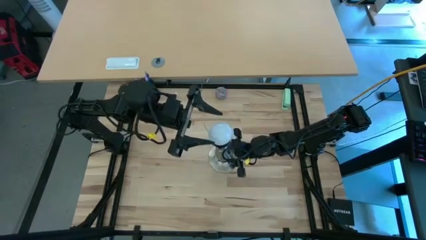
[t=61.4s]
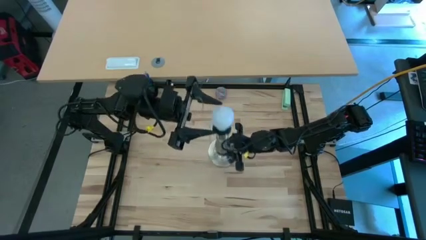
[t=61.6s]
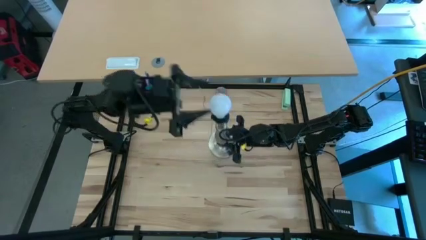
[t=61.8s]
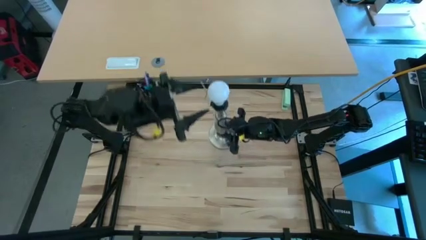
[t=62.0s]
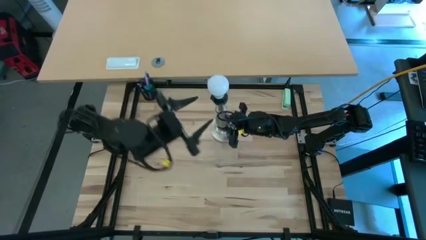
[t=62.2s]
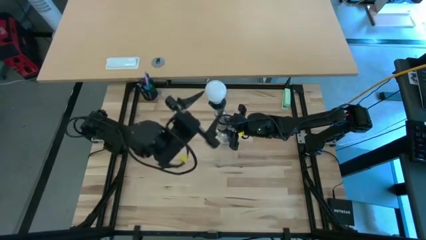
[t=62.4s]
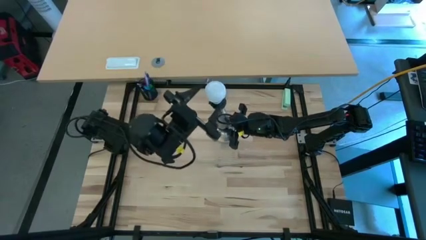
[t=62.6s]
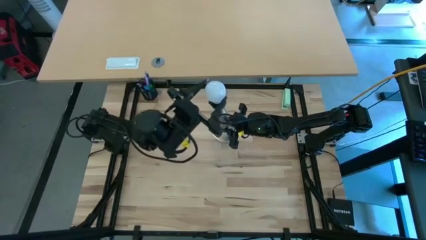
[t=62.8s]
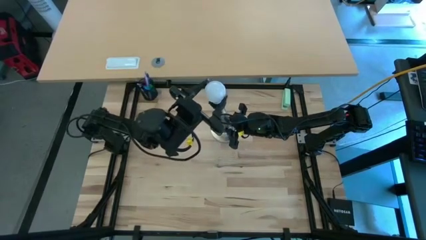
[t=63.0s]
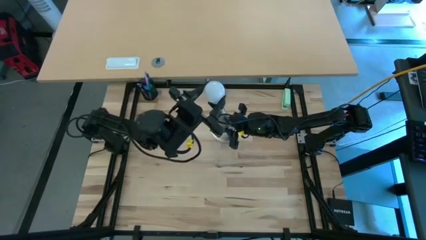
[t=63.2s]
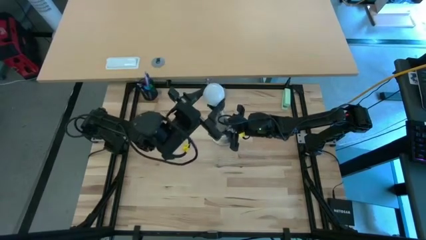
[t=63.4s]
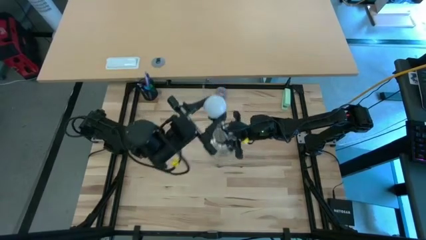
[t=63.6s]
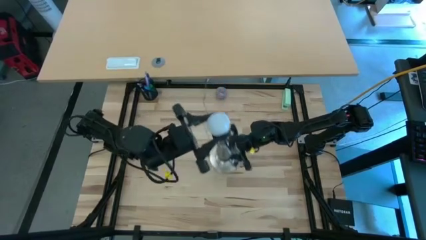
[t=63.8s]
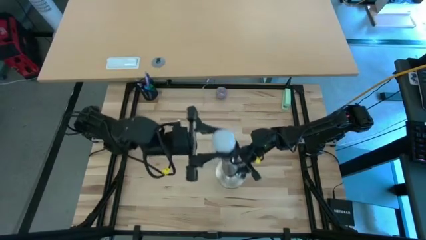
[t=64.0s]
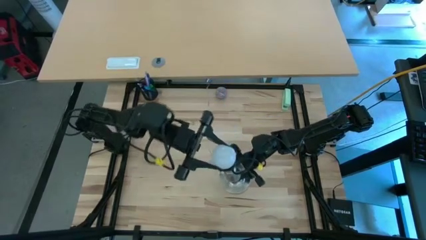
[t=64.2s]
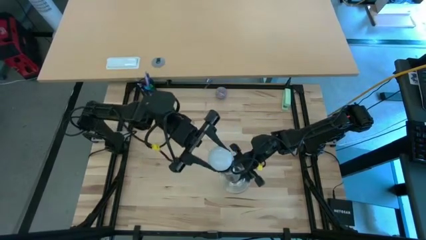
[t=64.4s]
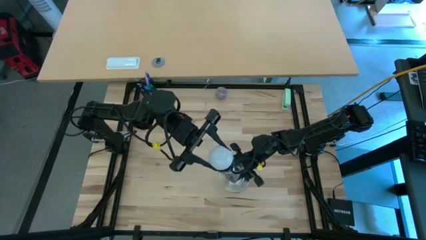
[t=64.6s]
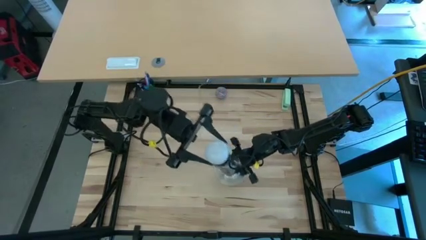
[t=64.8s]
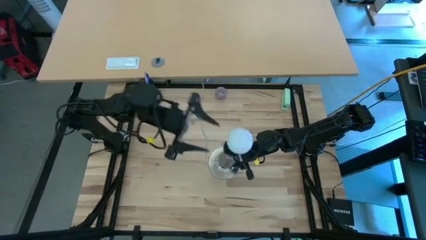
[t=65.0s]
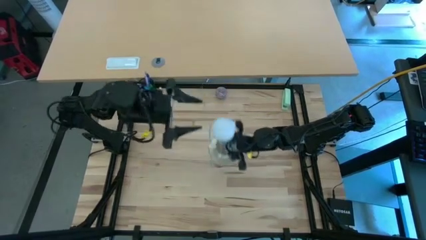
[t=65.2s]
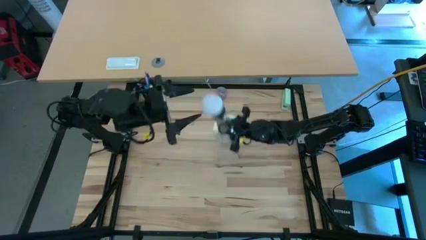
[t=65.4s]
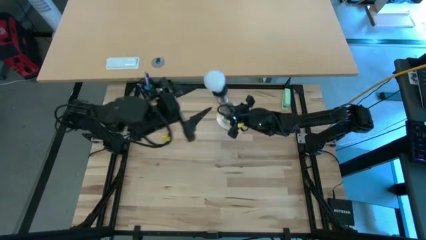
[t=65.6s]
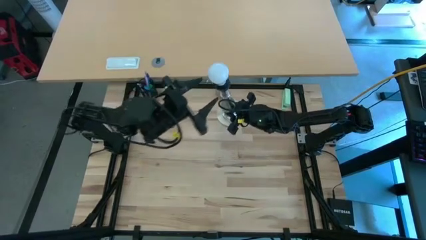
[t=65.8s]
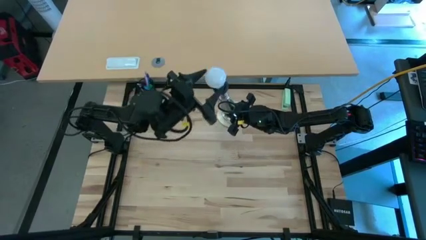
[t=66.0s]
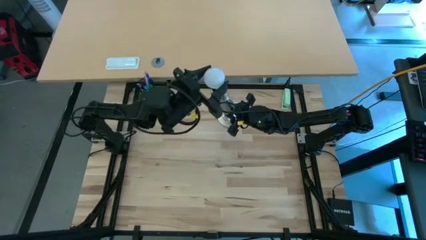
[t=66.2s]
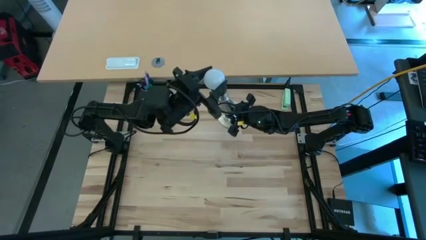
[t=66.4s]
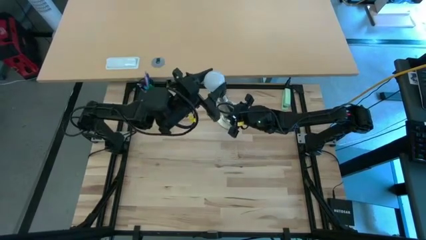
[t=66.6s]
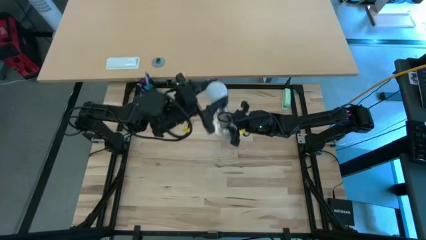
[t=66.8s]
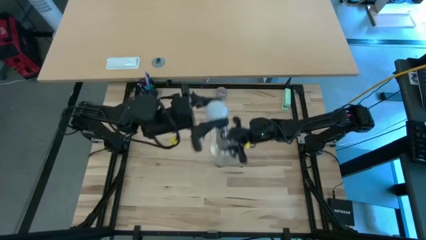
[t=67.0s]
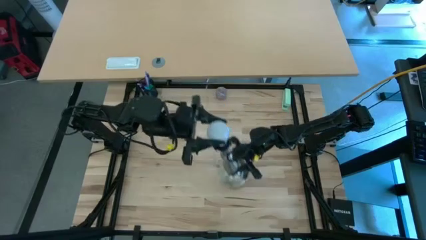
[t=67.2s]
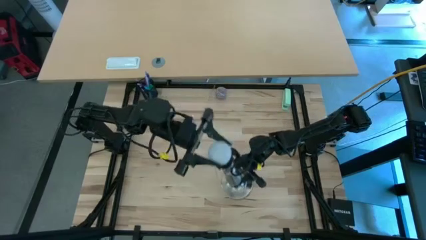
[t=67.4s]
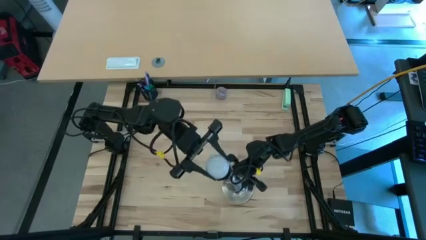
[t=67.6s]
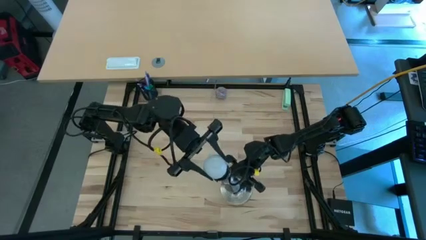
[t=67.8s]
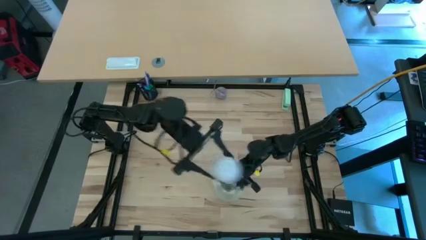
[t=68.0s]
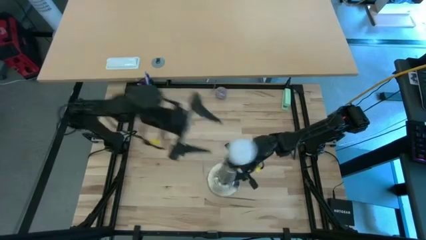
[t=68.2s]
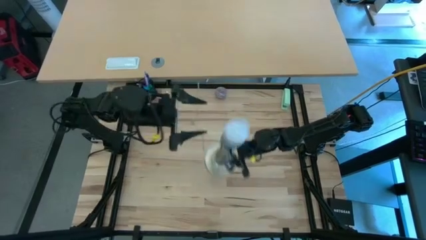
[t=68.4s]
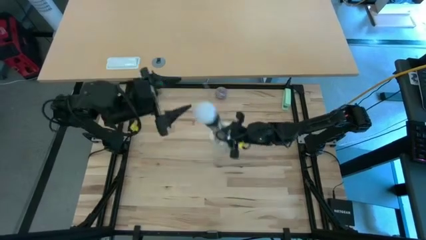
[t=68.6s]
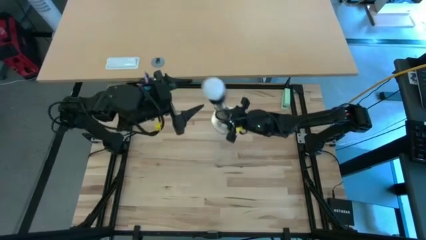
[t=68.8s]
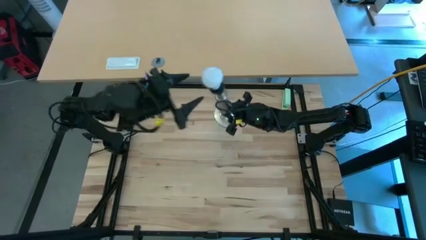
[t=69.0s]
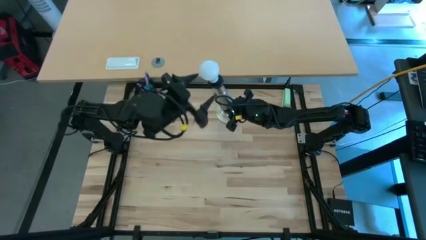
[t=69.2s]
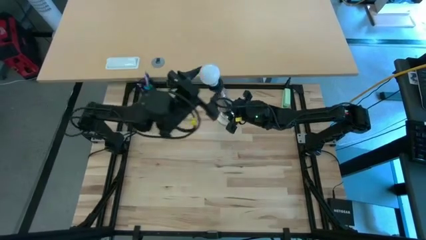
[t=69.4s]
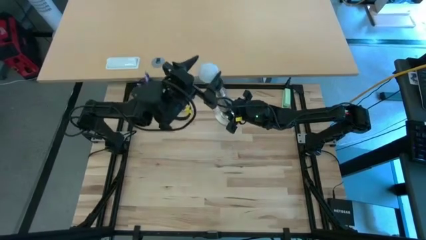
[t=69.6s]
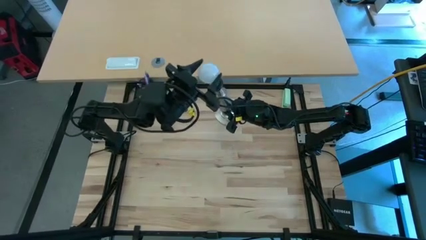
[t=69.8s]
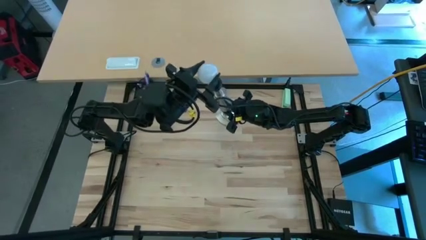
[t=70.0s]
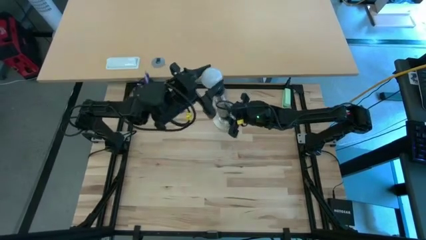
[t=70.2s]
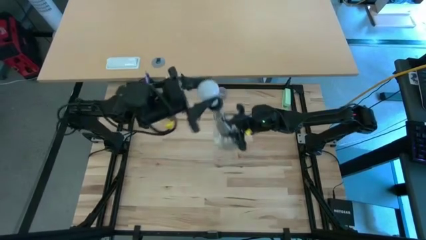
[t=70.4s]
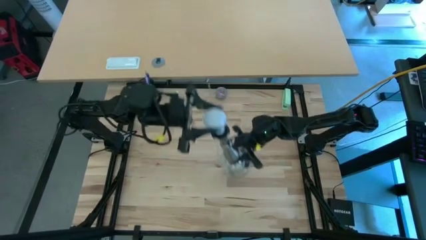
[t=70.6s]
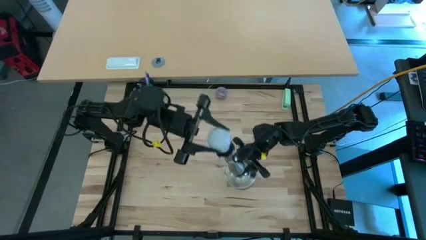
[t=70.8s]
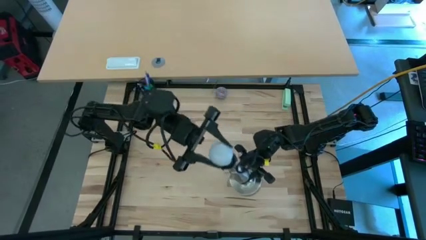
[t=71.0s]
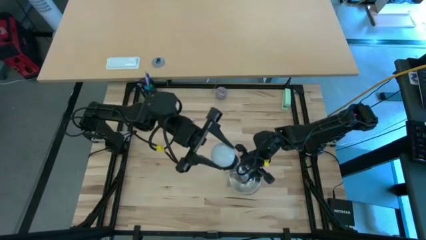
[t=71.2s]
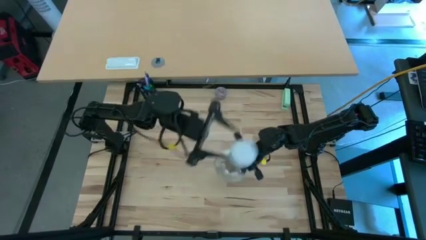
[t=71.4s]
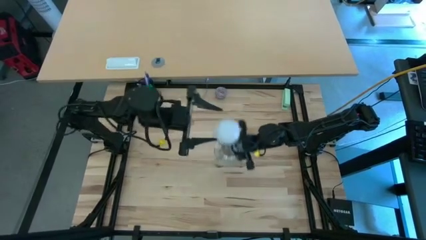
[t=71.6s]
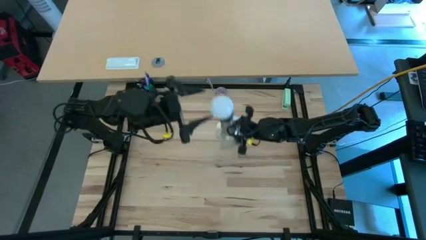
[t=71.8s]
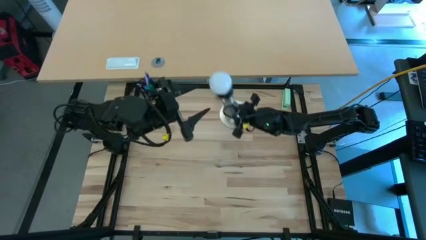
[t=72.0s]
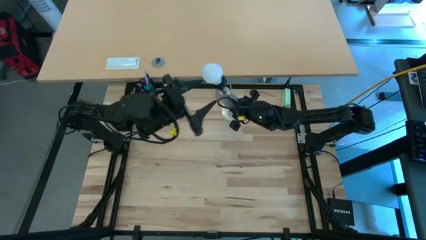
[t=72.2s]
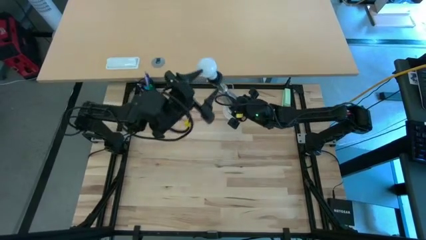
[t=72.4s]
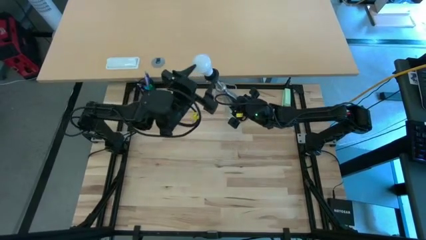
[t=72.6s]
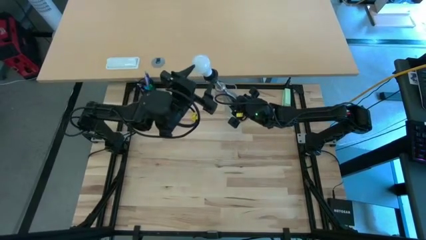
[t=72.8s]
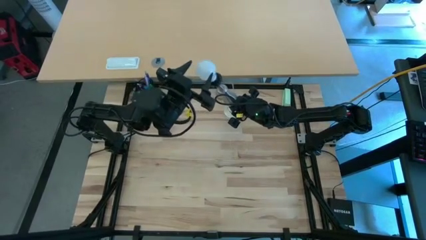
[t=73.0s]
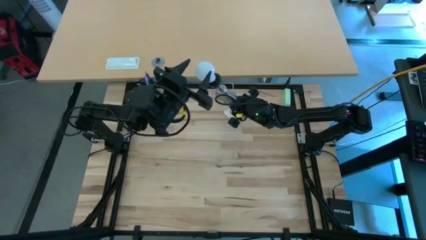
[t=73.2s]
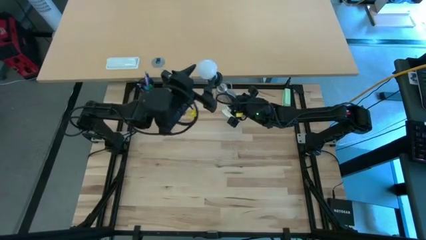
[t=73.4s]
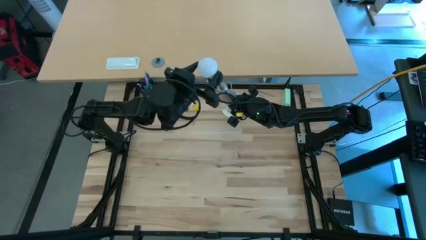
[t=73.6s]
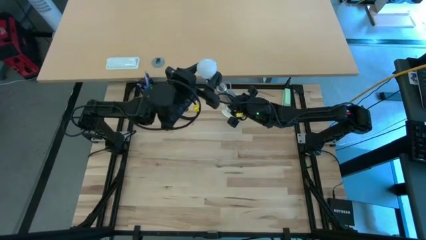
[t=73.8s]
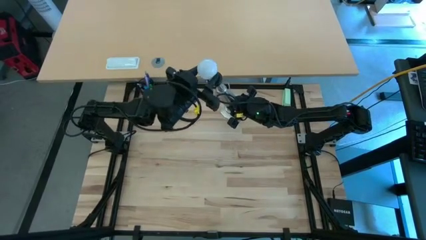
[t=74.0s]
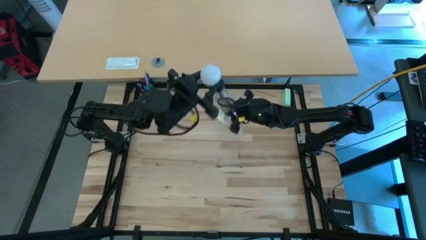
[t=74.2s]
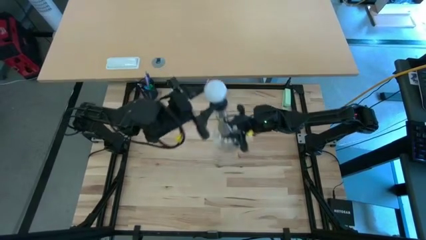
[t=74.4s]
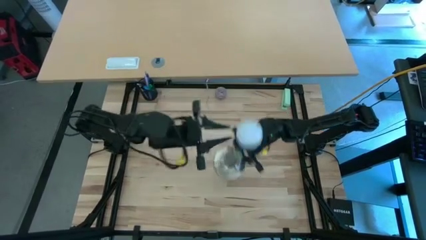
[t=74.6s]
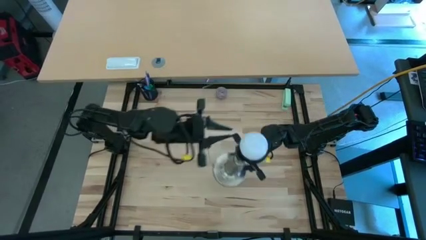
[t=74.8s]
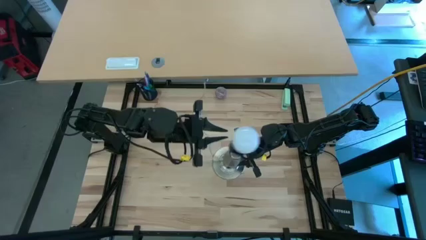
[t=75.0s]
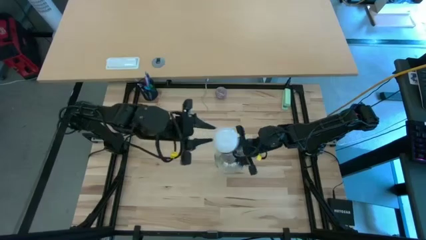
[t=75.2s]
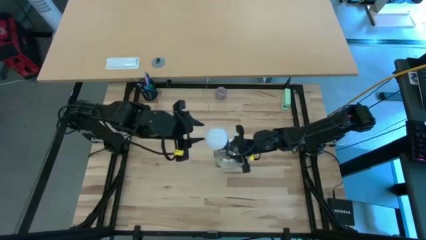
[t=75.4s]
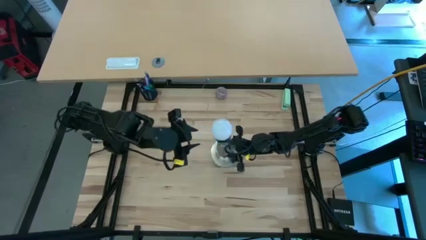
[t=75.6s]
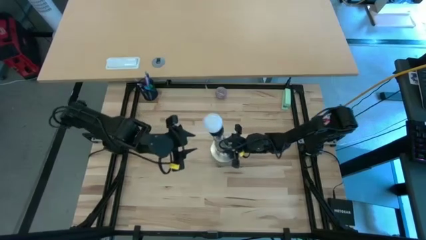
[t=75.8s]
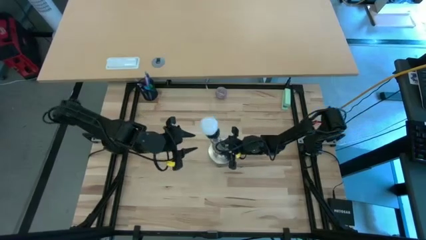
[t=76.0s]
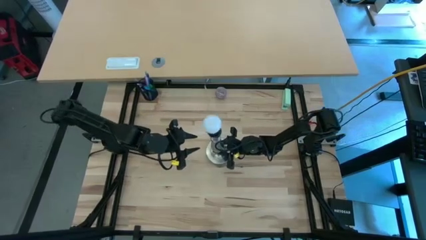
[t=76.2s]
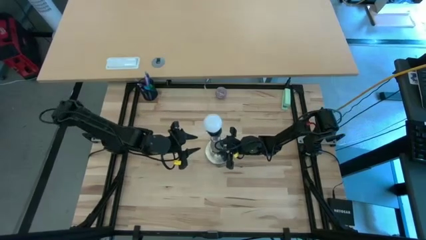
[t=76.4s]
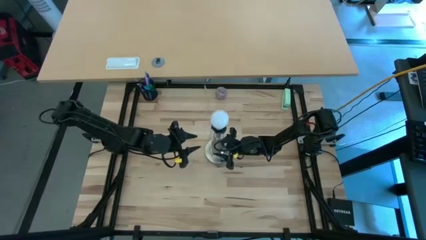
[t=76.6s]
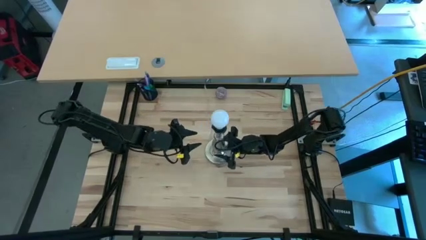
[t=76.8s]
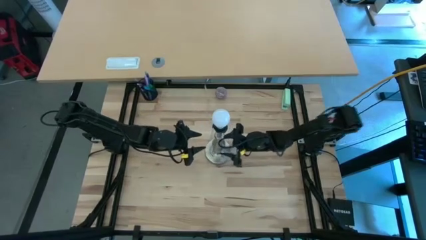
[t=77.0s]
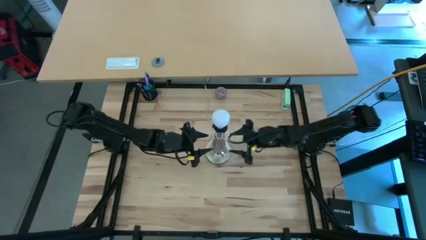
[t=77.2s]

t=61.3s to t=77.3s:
Task: Screw lightbulb
Insert the lightbulb into the silver lamp
